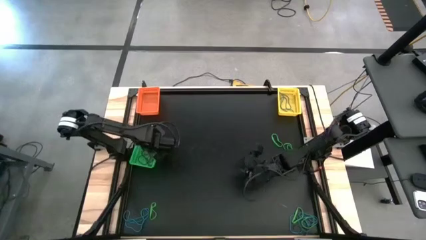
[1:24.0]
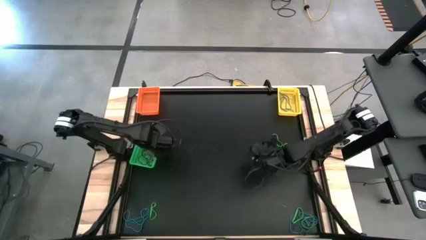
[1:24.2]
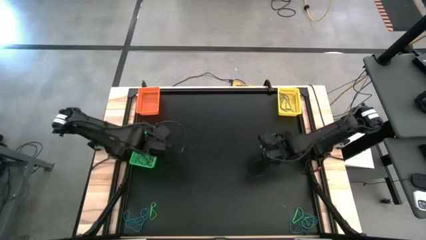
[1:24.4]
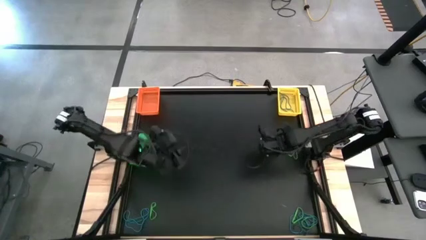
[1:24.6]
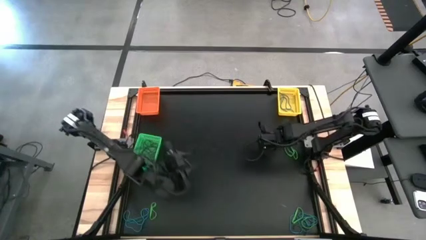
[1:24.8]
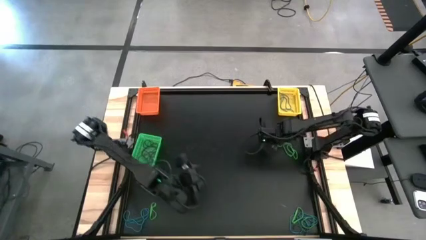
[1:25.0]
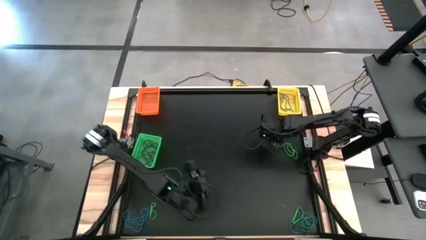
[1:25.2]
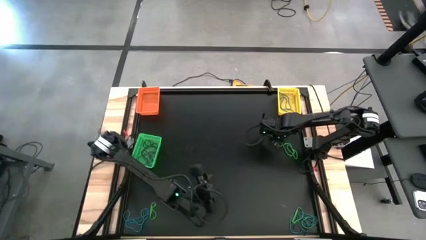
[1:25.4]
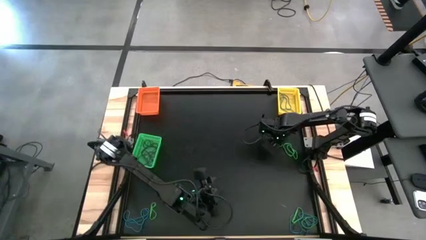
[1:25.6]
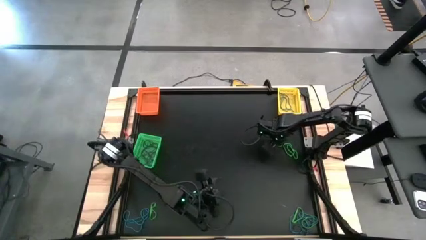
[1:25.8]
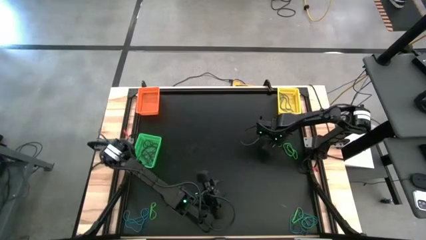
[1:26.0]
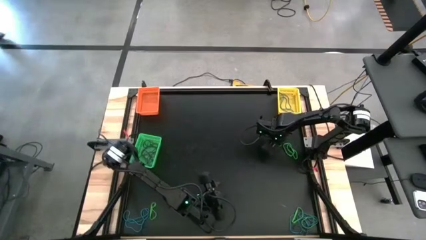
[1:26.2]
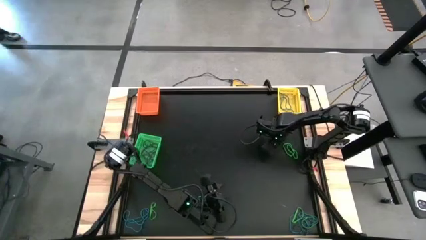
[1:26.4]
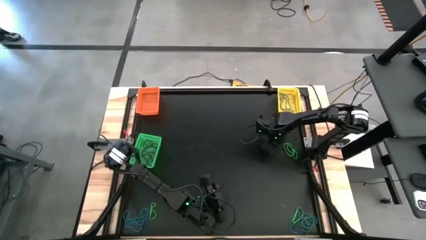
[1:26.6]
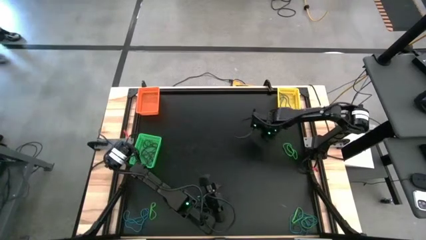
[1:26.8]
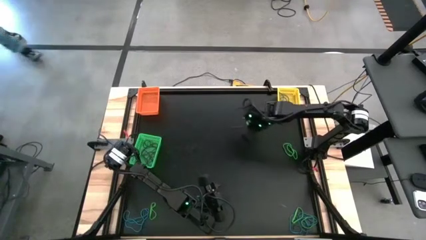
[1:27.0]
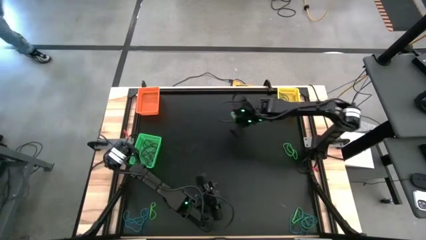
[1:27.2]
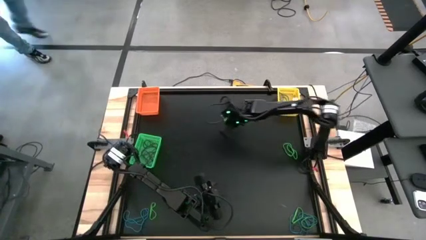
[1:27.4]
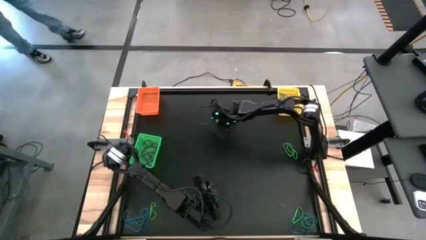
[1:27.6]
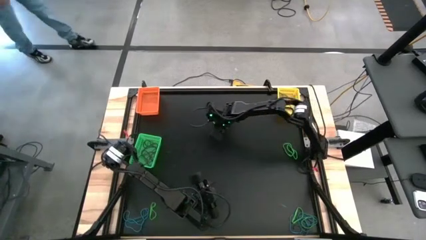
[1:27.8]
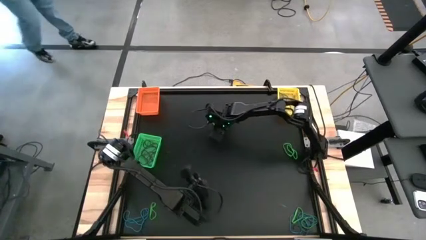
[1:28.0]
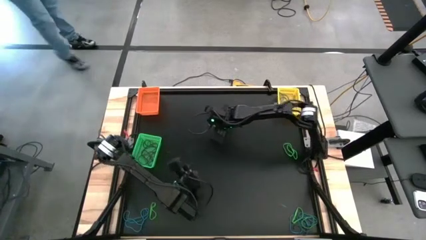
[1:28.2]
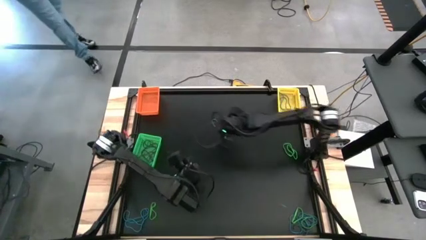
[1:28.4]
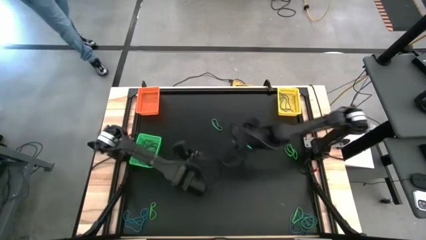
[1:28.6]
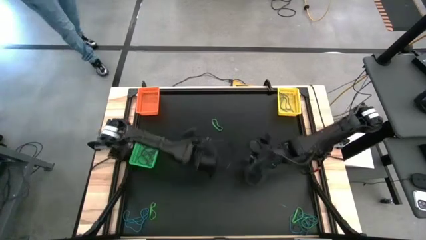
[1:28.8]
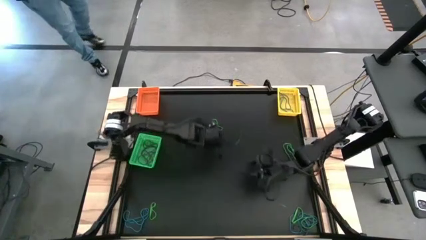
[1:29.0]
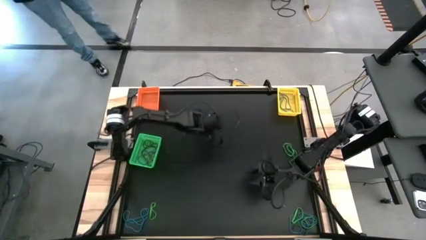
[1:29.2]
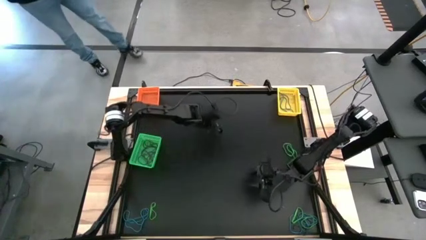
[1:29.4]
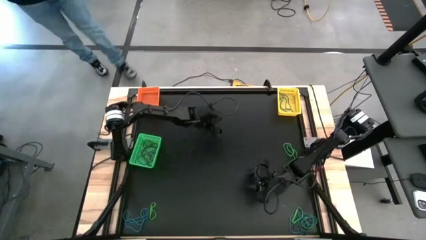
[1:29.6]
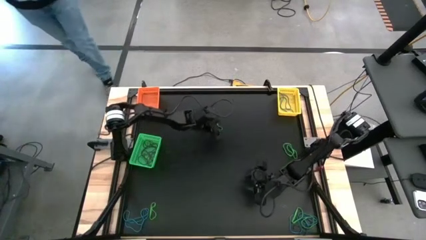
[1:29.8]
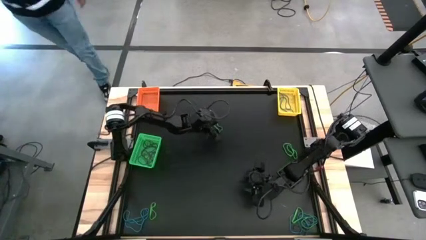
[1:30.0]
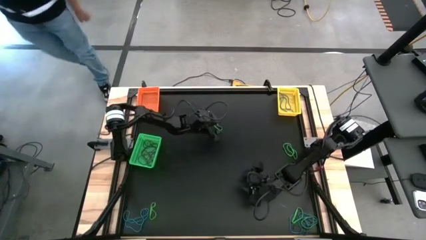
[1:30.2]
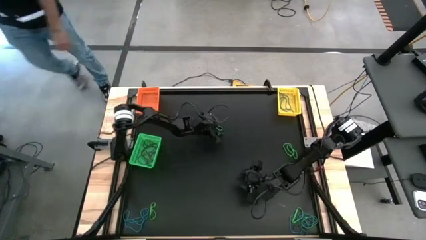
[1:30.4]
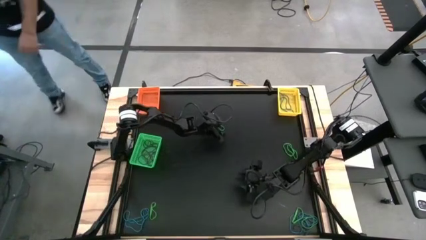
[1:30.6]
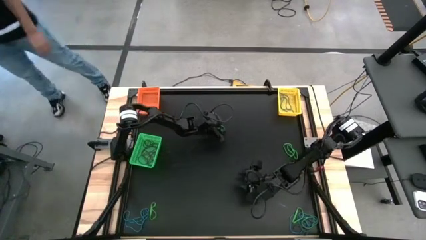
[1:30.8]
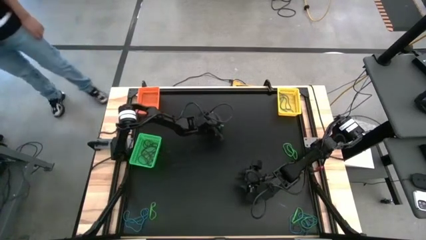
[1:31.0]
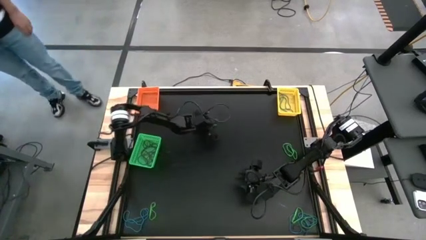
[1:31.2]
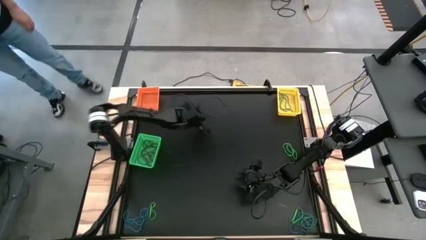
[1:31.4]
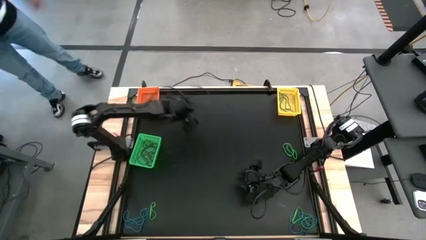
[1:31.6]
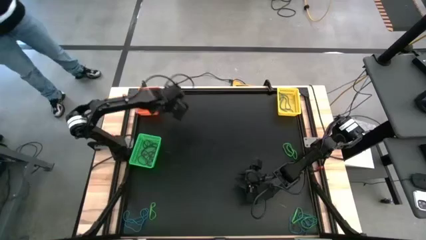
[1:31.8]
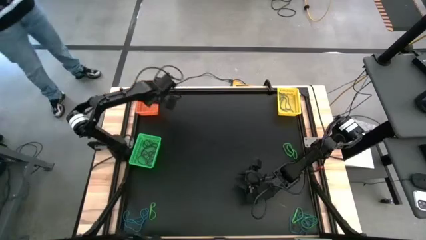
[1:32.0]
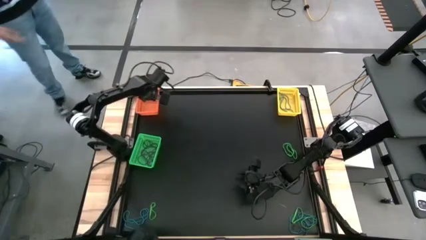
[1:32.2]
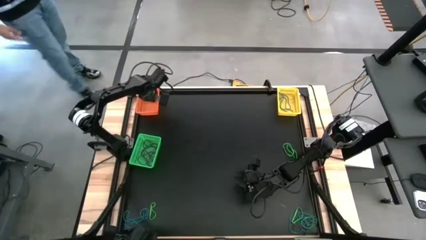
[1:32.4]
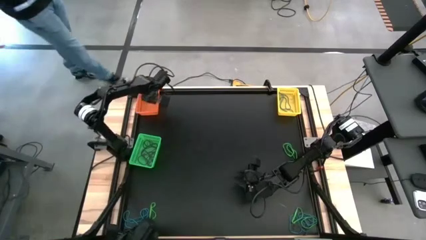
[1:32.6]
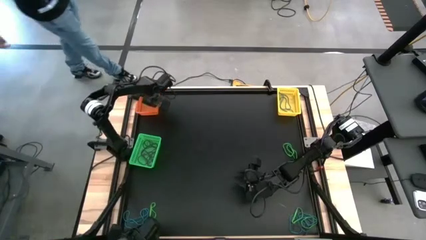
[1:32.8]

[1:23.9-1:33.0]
Task: Sort rubber bands into baskets
Put the middle right green rubber band into the orange bin

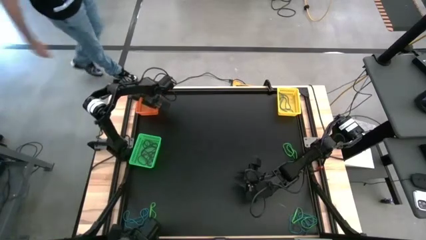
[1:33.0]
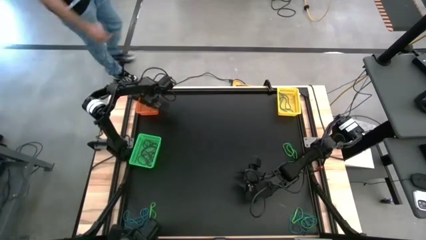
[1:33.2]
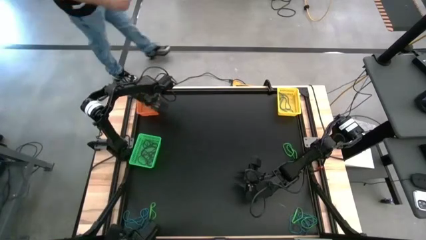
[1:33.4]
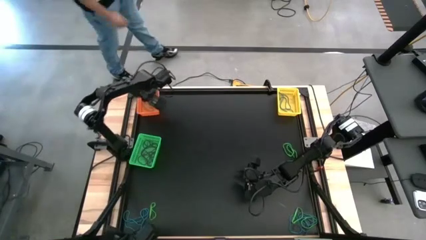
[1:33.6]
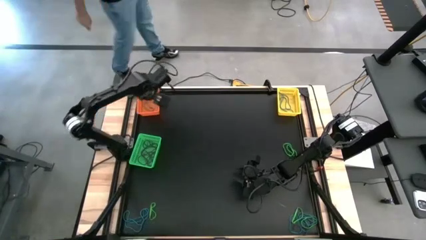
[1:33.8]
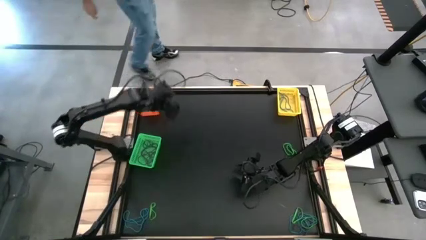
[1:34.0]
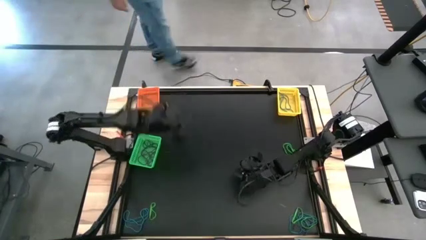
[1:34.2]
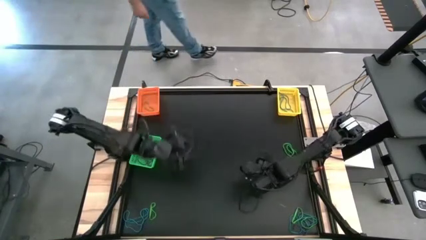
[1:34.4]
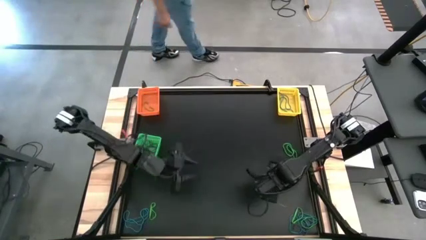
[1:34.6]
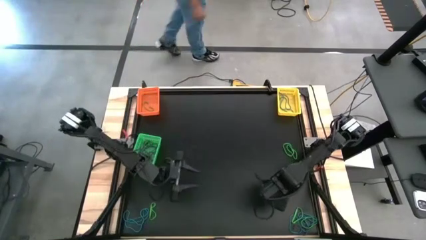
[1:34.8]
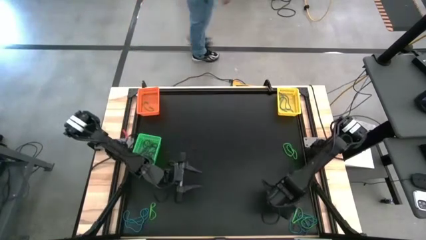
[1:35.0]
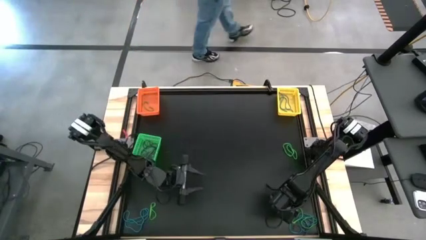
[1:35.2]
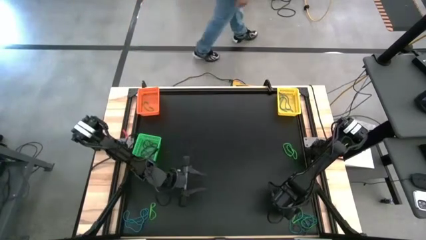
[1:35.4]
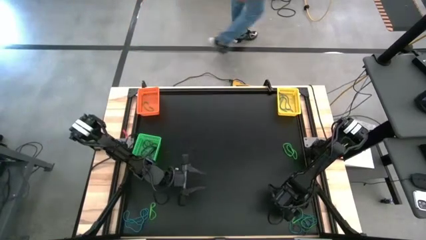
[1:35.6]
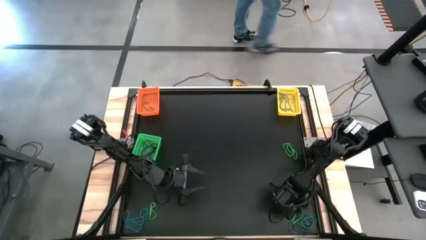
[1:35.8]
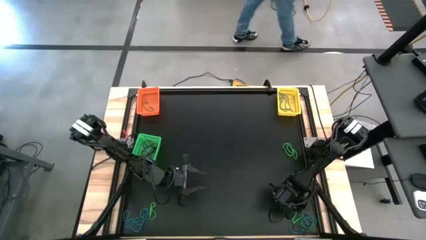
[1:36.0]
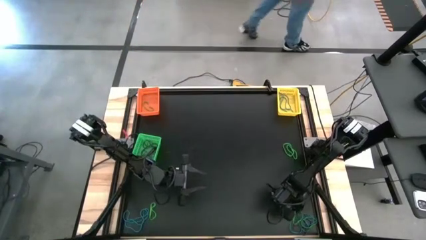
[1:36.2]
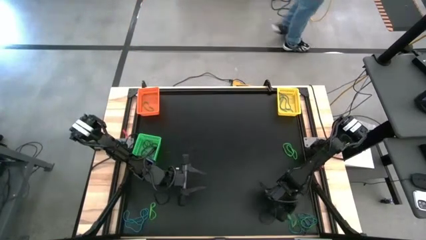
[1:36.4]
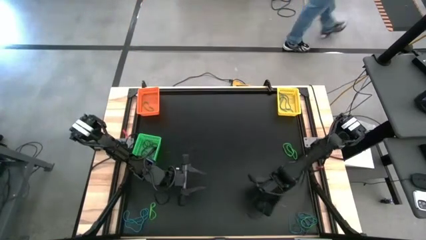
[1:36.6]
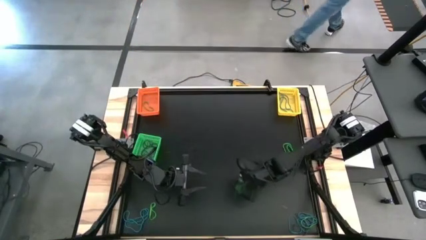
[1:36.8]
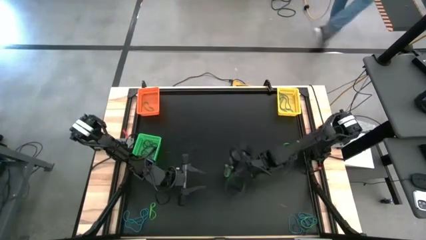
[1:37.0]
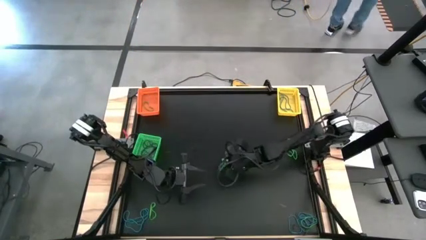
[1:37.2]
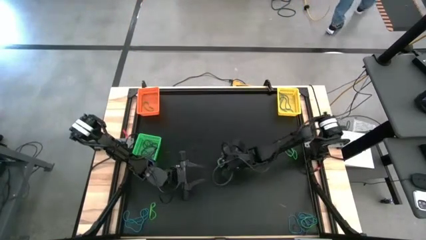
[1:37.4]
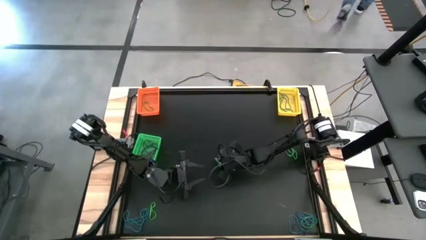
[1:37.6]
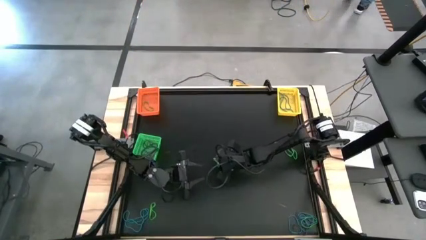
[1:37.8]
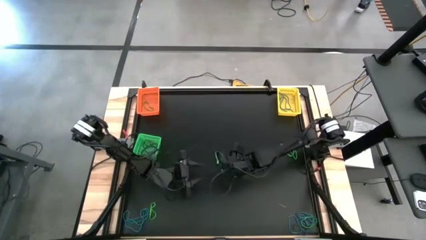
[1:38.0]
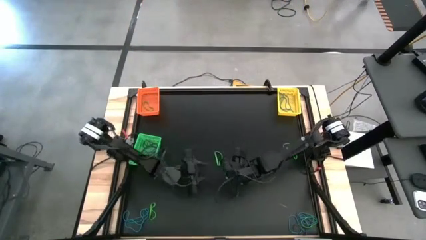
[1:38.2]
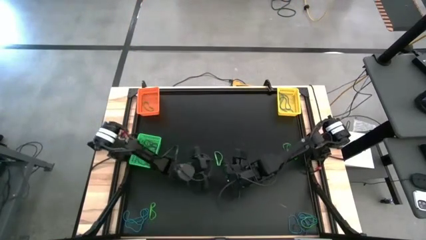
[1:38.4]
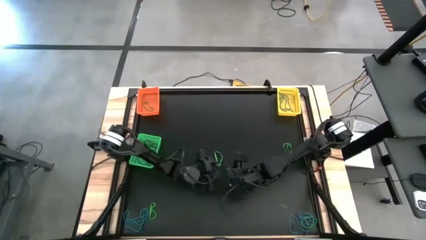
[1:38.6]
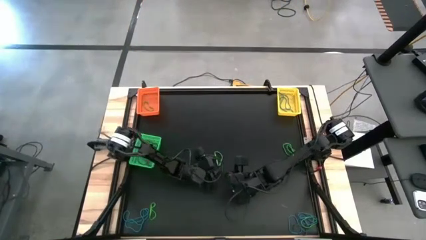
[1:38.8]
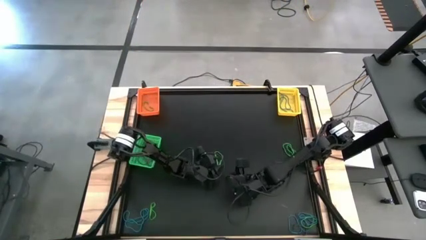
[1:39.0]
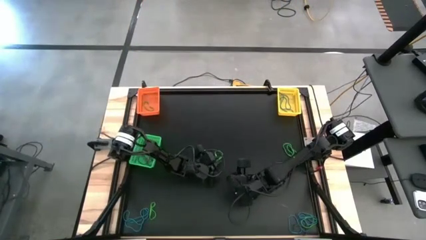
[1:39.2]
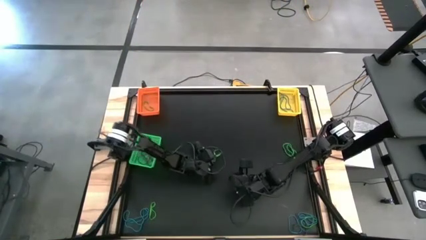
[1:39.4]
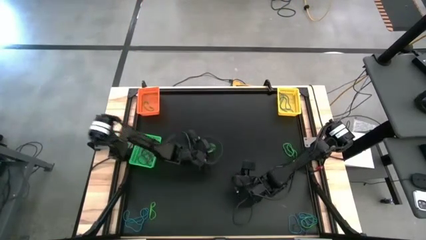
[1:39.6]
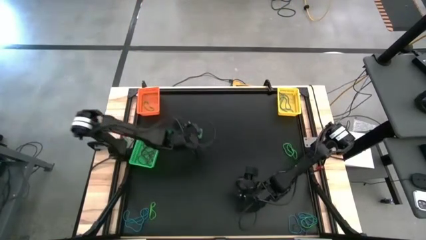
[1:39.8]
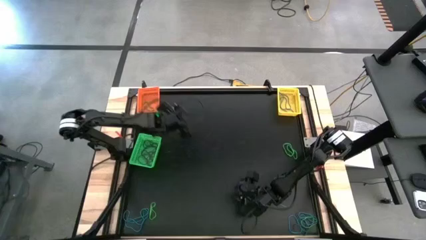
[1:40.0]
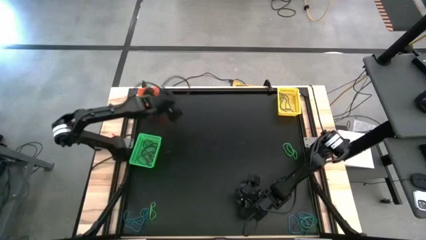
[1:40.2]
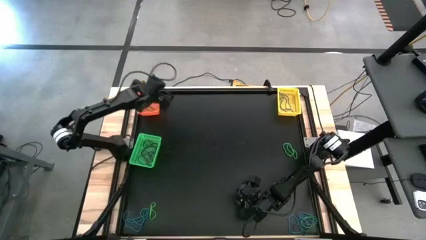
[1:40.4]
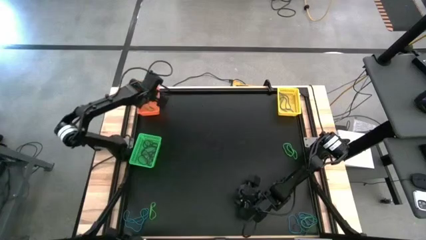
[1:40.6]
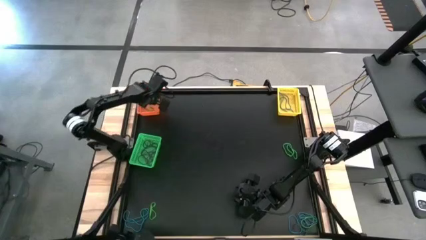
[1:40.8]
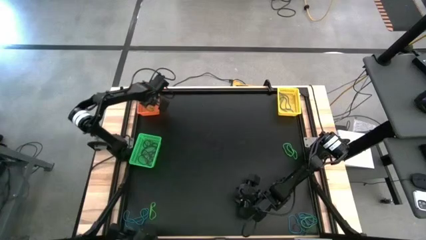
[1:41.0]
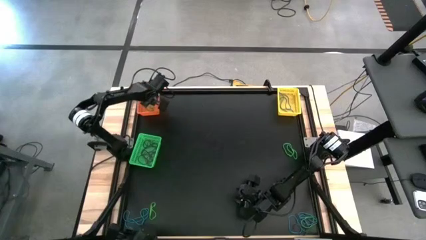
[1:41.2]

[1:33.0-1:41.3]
Put the bottom right green rubber band into the orange bin
